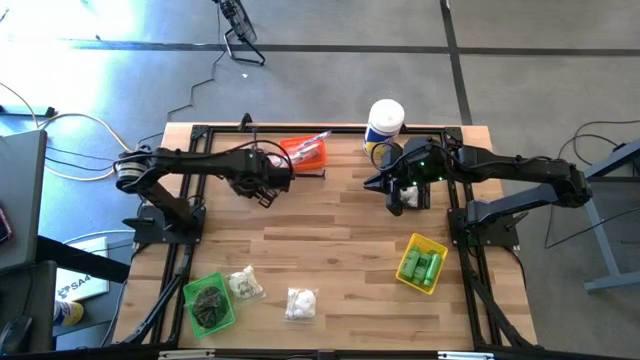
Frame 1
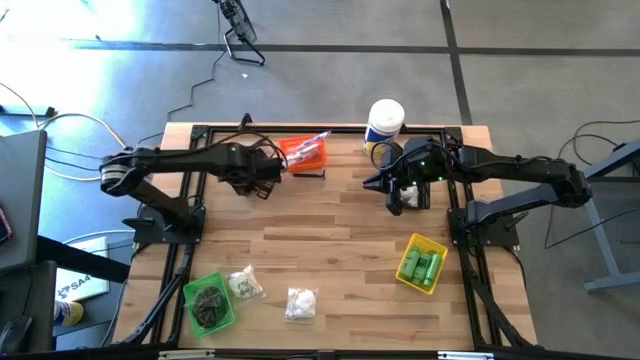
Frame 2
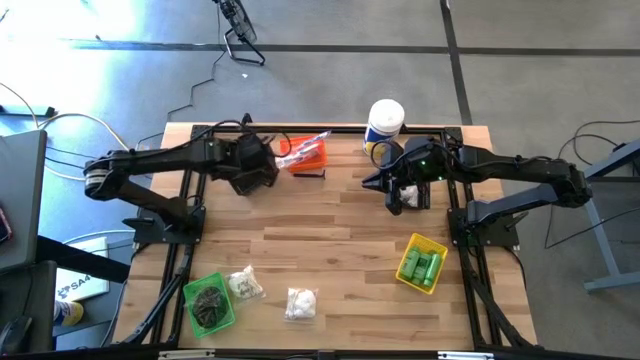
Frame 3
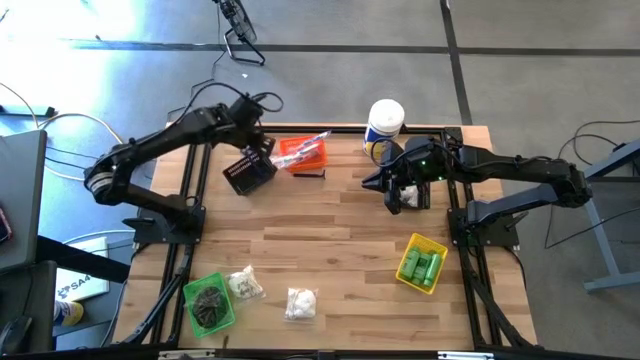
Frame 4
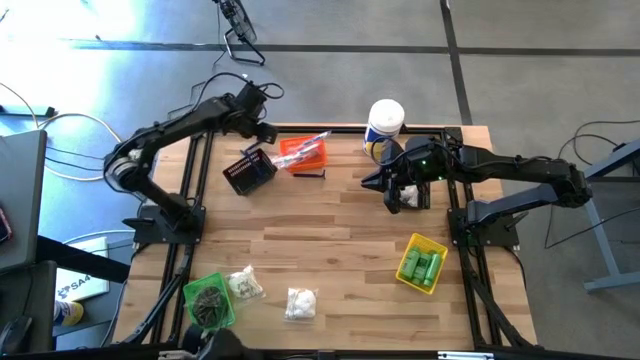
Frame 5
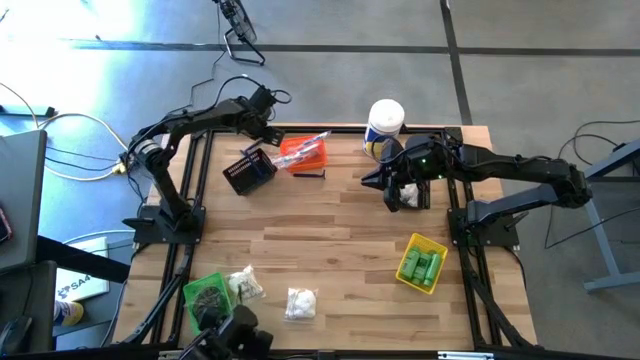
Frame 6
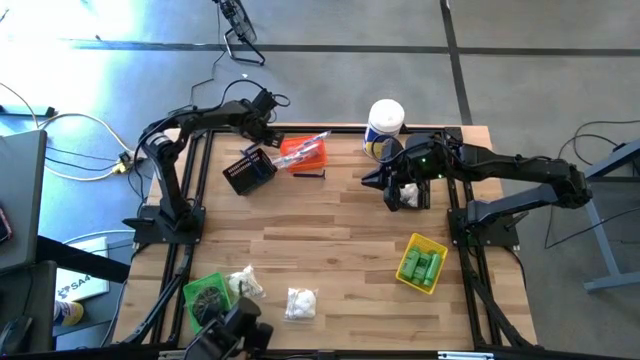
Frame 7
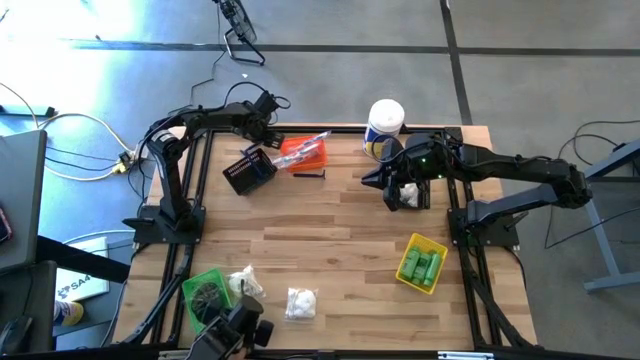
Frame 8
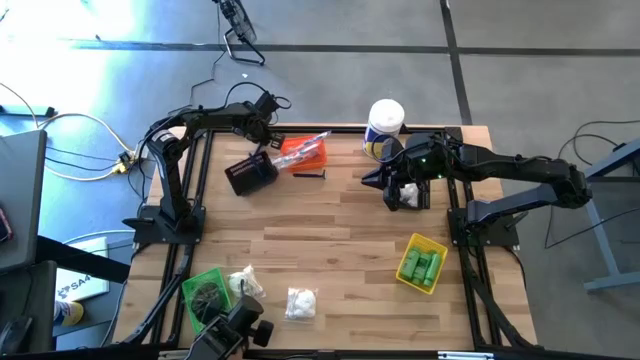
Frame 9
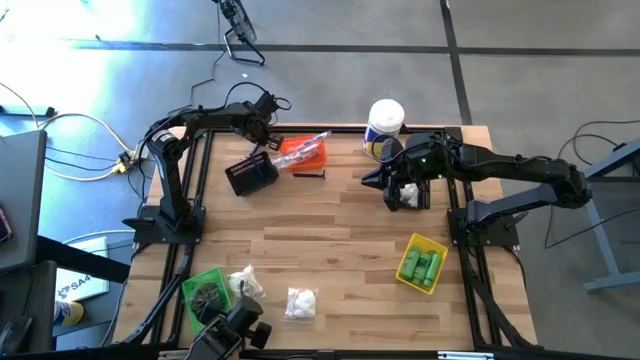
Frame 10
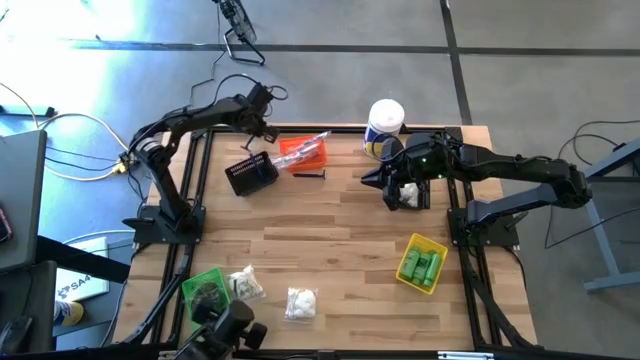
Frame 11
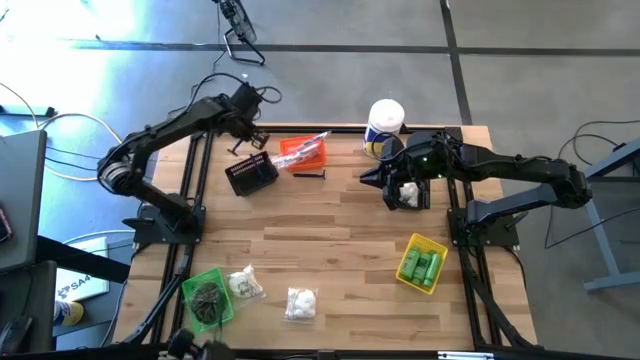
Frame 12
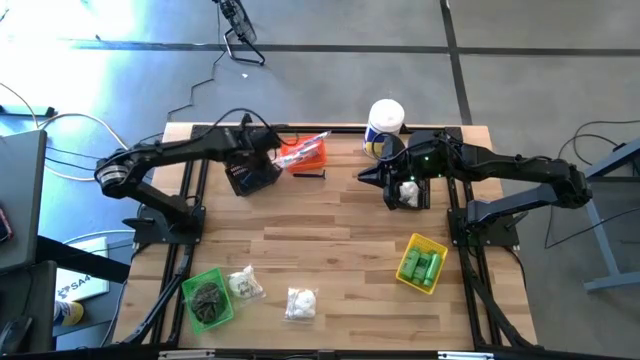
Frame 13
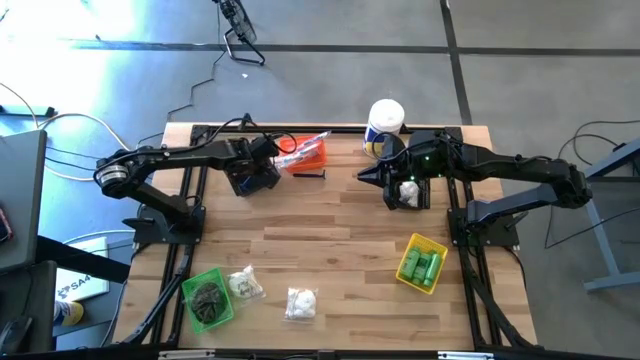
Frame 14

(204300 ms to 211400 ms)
Task: Pick & Place Travel size toiletries
Put the blue razor into the left black bin

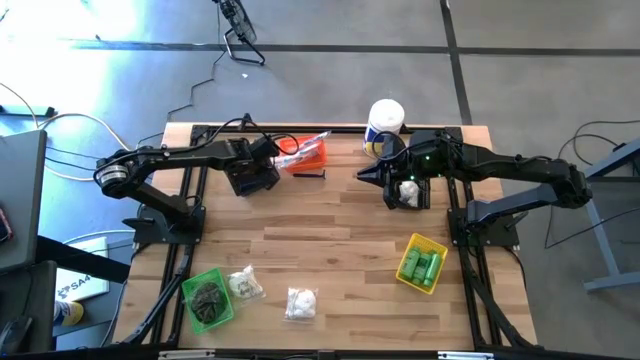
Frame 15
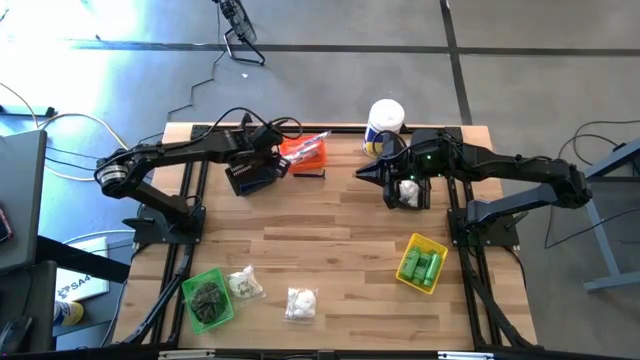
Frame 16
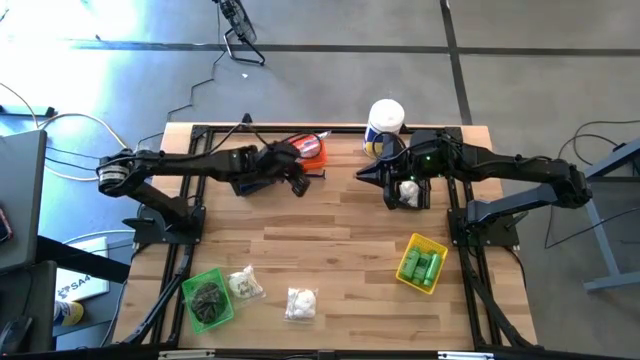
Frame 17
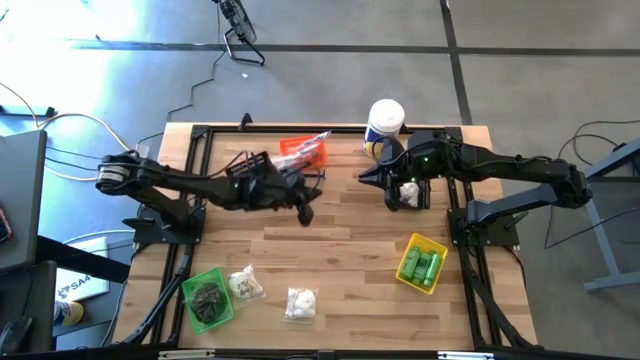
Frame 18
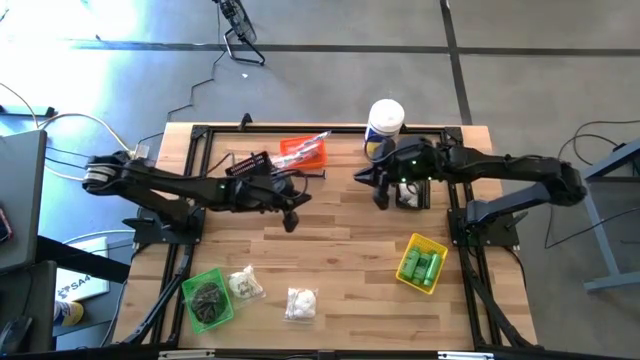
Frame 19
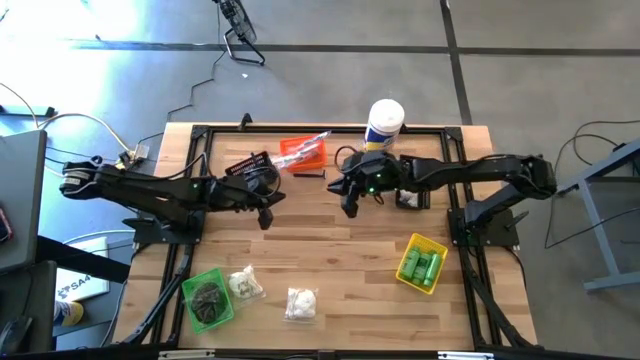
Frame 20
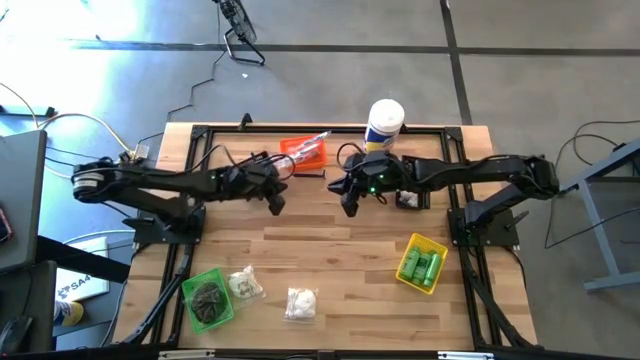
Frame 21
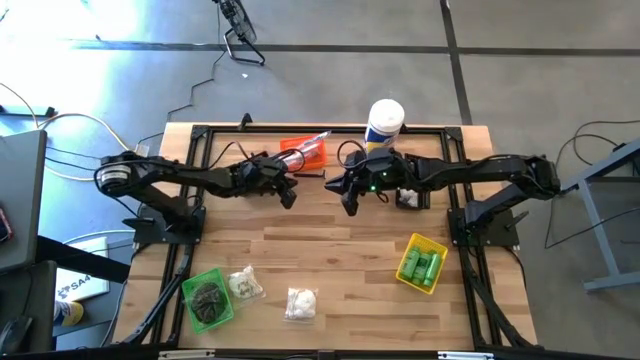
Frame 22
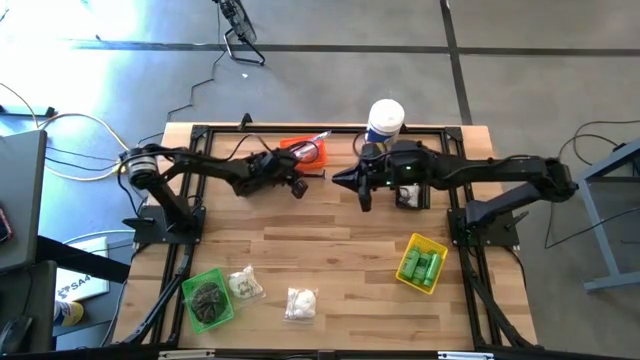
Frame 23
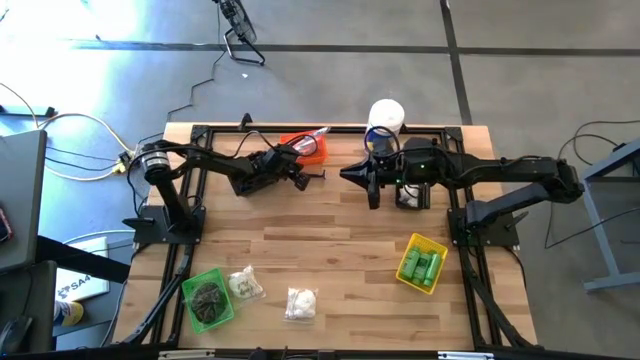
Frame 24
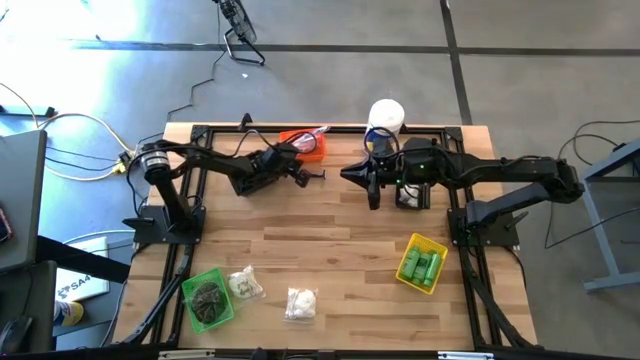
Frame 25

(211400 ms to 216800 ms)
Adjust the left black bin

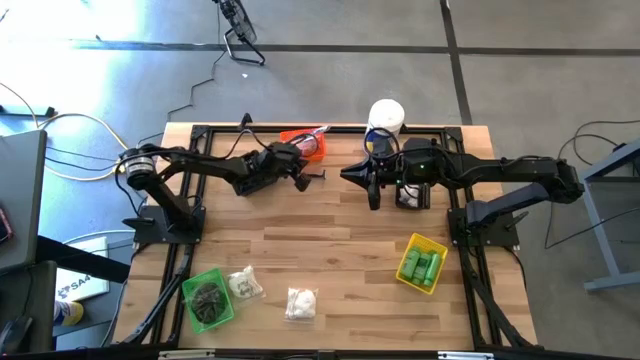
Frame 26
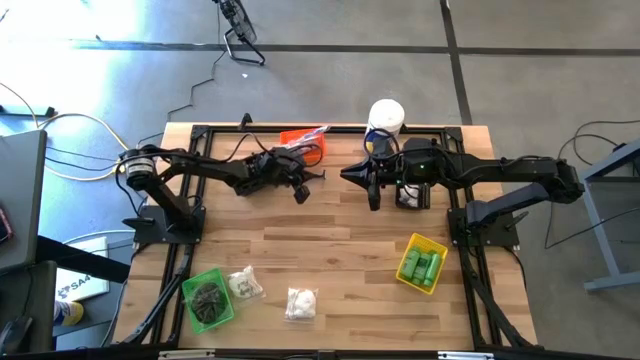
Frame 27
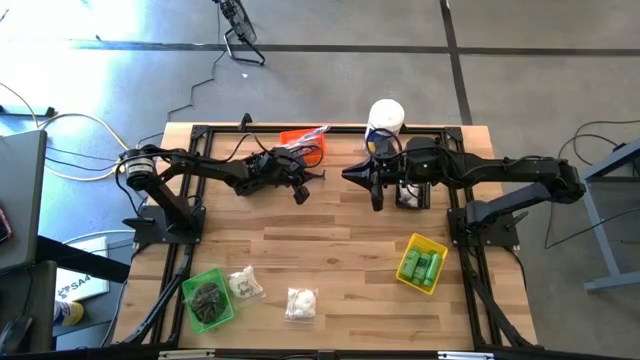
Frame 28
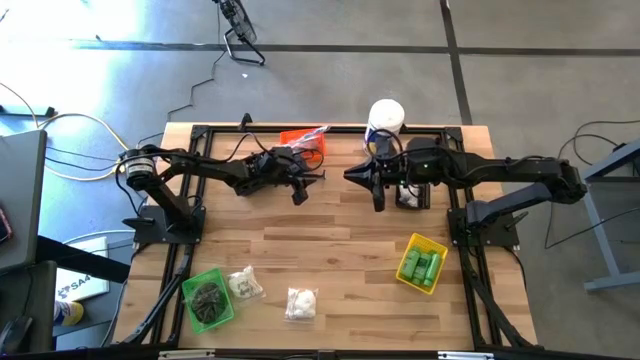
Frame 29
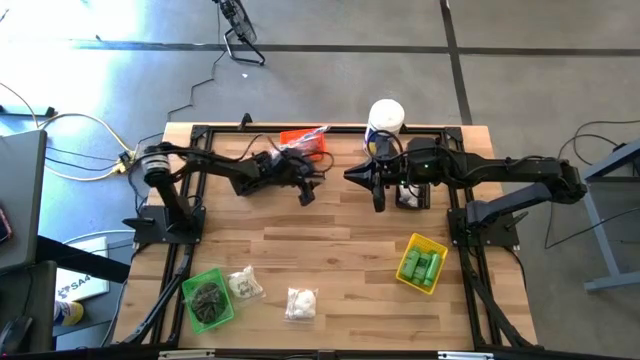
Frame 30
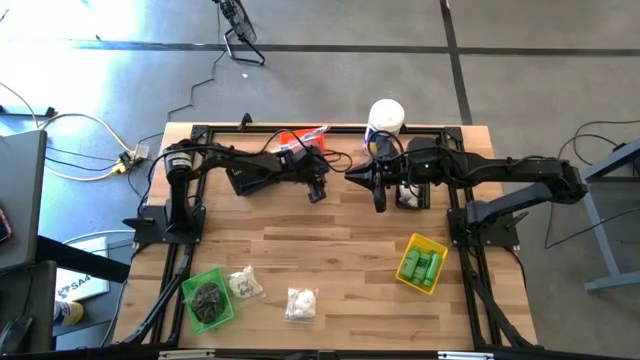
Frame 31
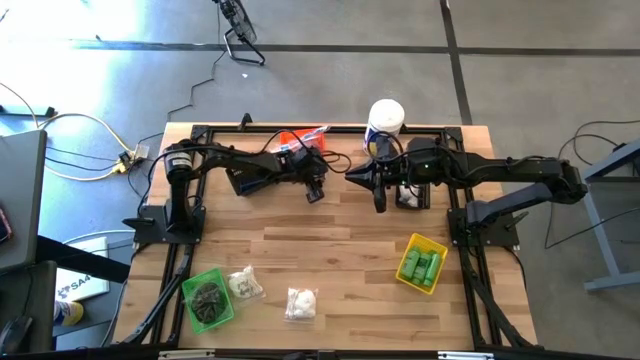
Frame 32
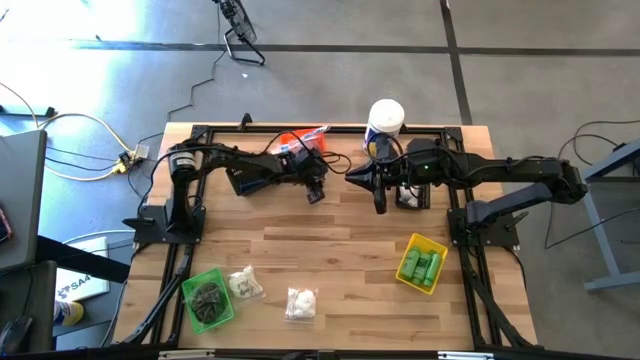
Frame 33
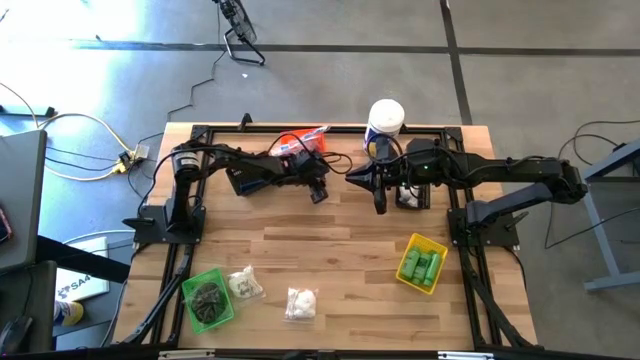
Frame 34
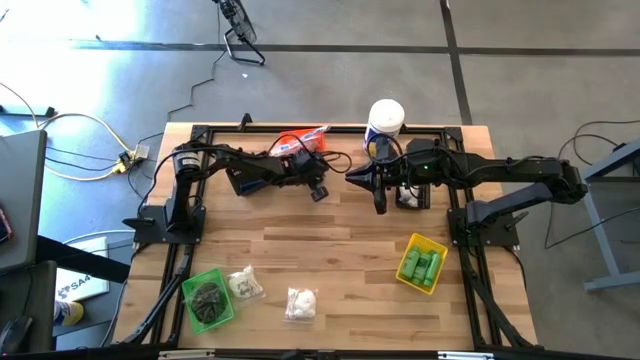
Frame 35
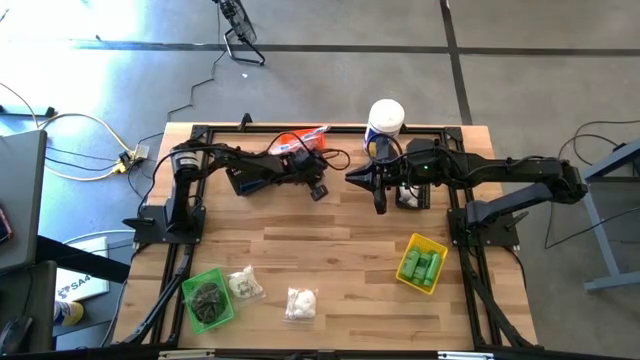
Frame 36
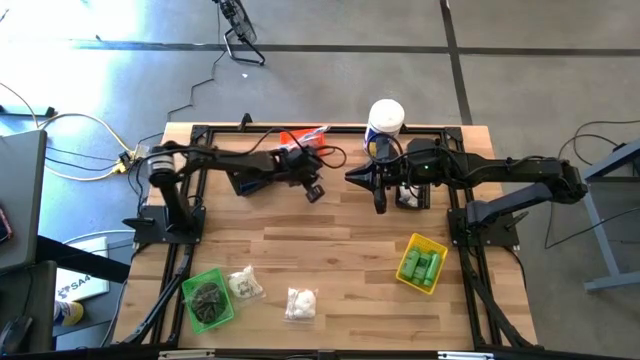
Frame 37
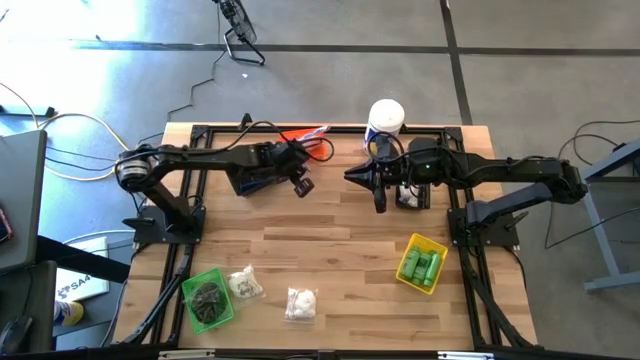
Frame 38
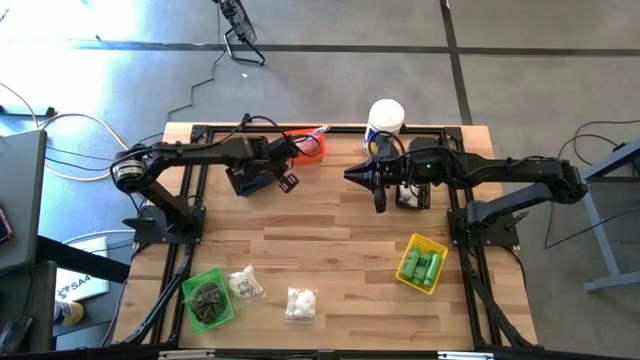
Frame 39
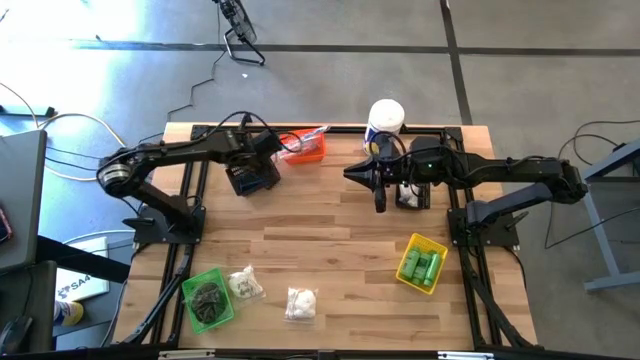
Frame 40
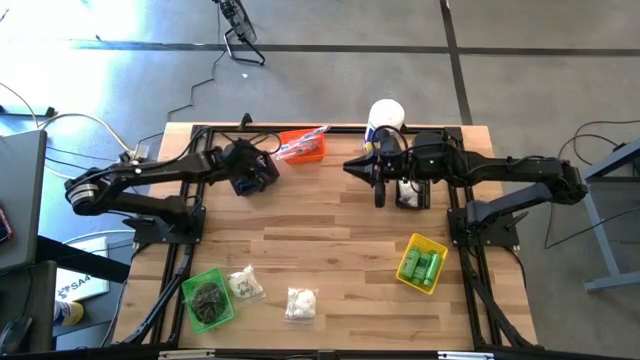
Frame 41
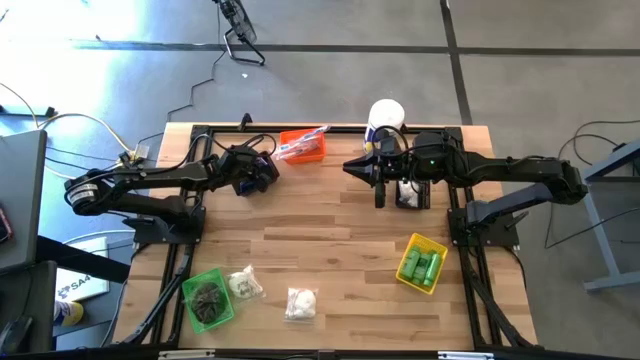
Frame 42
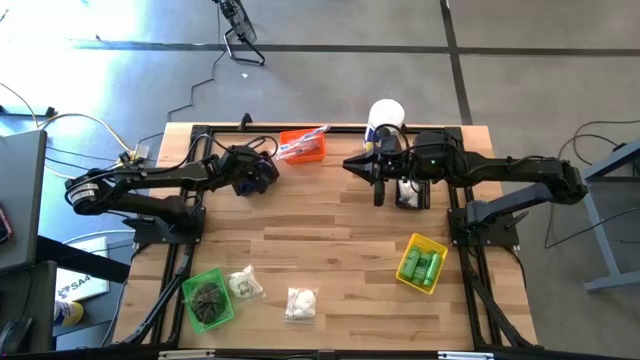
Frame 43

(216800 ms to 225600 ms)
Put the blue razor into the left black bin

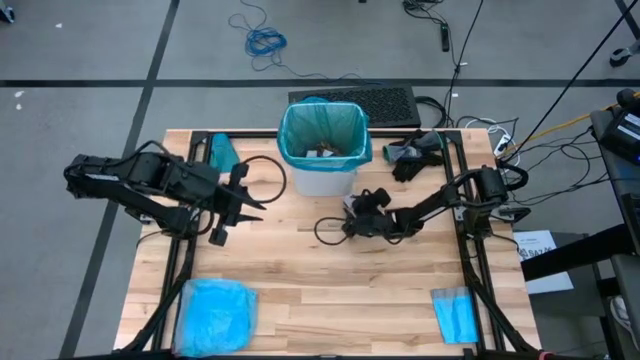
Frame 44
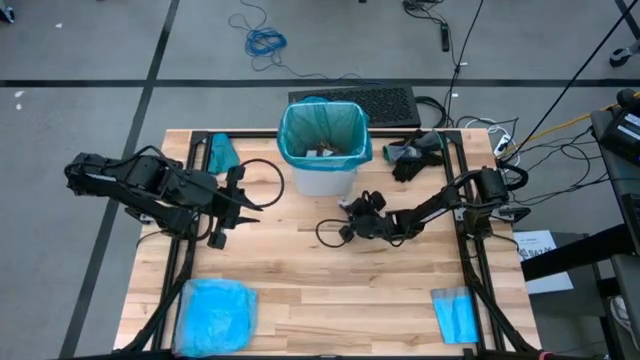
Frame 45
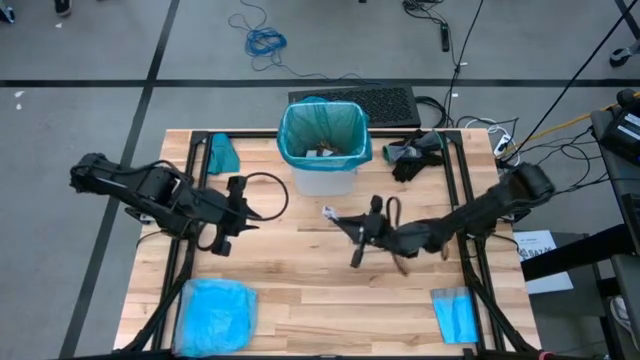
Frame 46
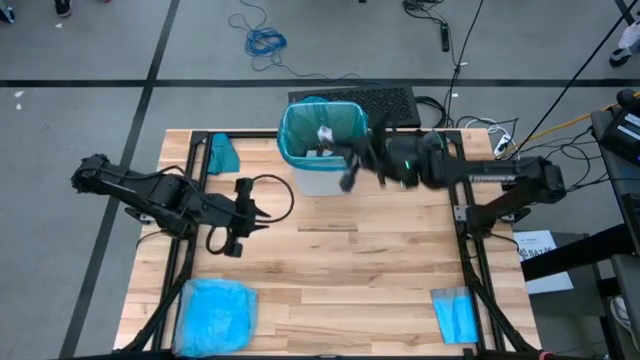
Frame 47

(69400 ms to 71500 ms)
Task: place trash/remove bag and relplace
Put the white paper into the trash bin
